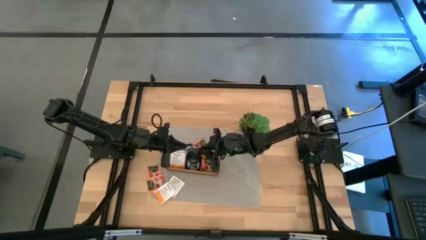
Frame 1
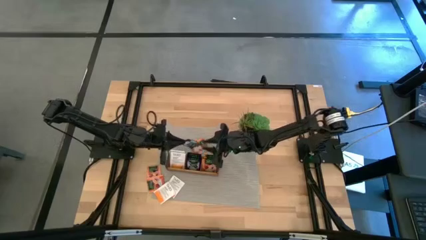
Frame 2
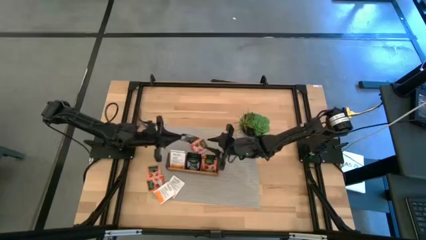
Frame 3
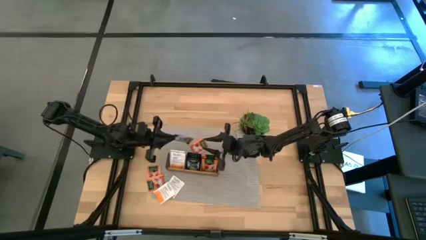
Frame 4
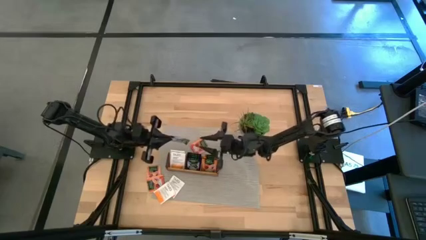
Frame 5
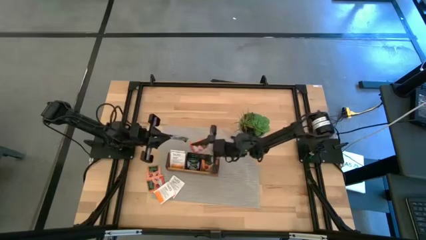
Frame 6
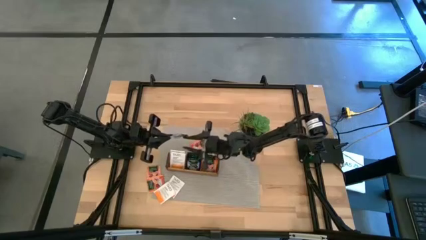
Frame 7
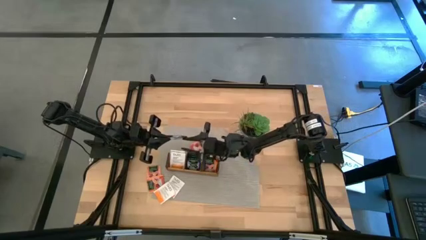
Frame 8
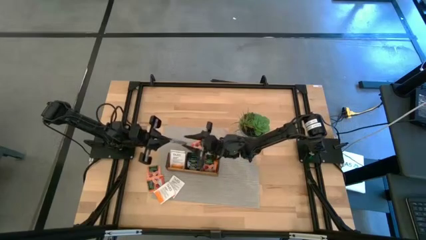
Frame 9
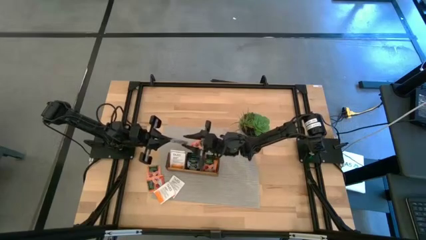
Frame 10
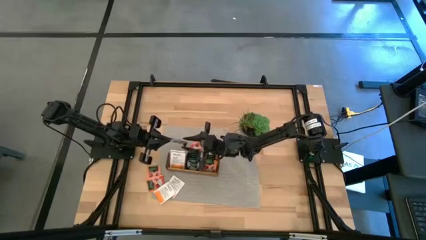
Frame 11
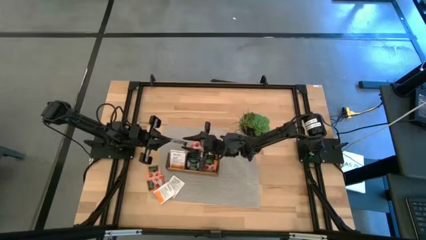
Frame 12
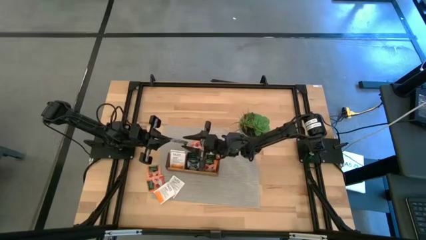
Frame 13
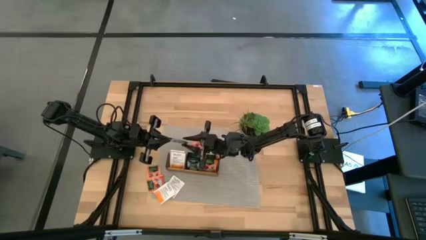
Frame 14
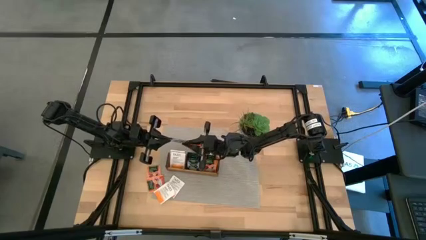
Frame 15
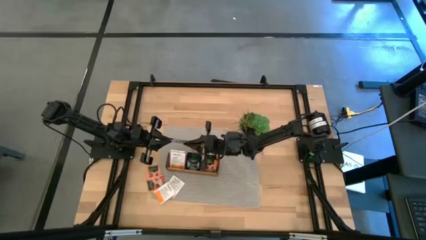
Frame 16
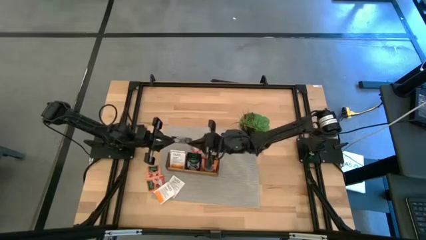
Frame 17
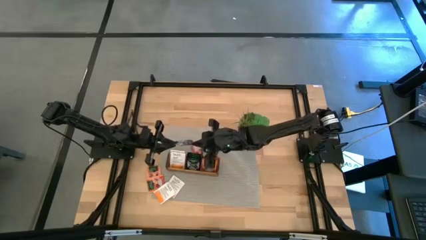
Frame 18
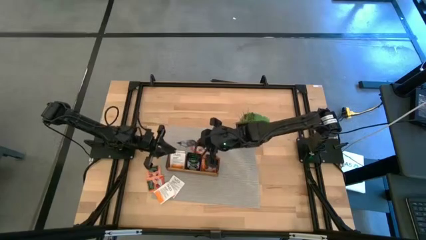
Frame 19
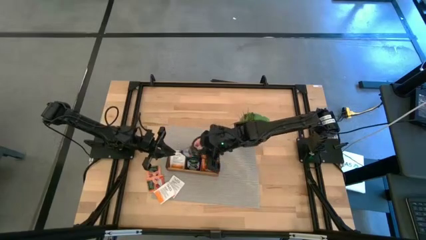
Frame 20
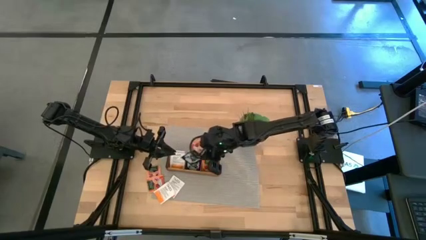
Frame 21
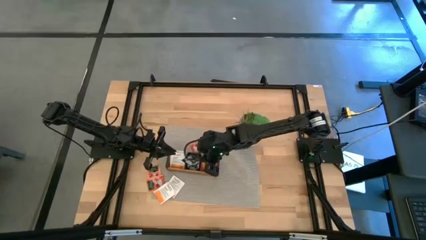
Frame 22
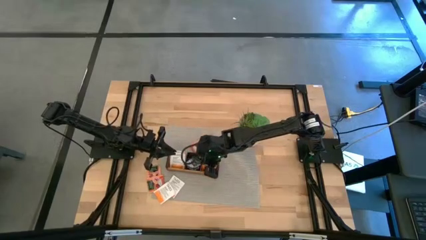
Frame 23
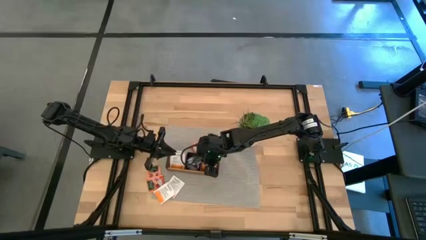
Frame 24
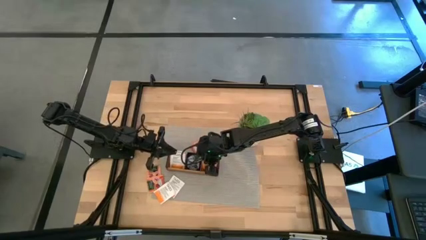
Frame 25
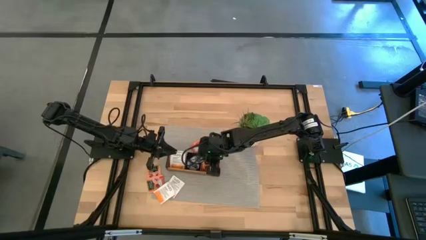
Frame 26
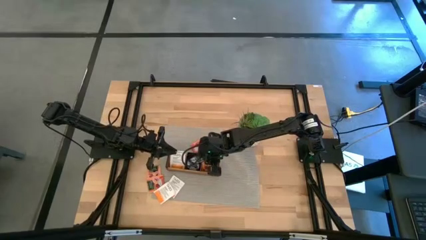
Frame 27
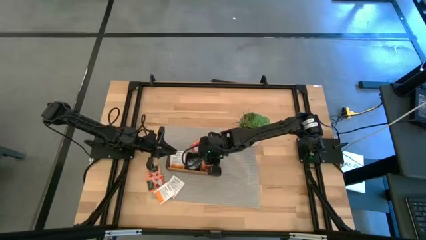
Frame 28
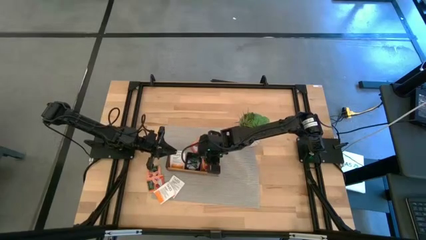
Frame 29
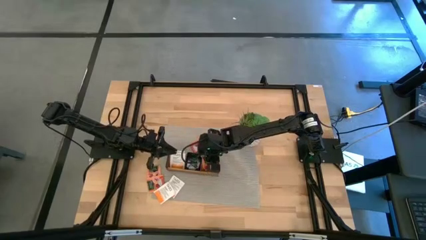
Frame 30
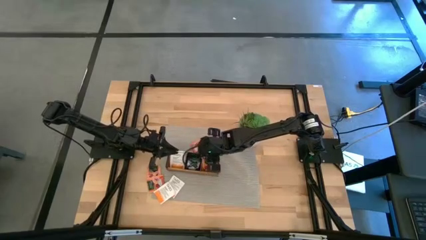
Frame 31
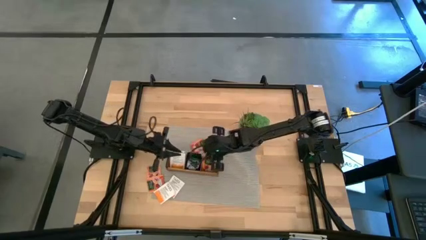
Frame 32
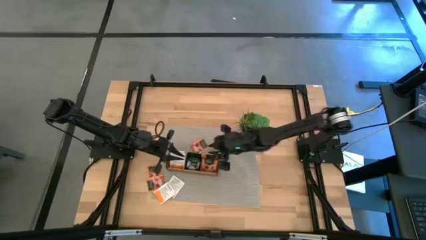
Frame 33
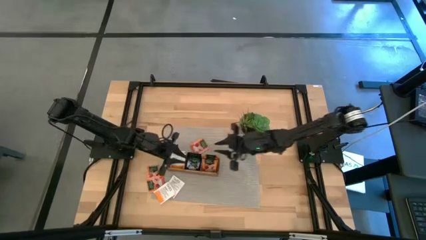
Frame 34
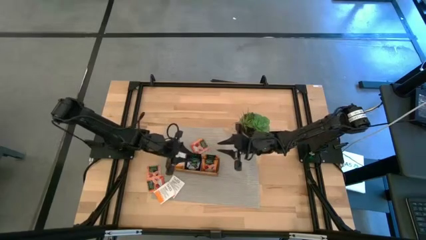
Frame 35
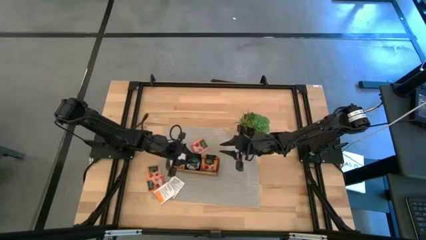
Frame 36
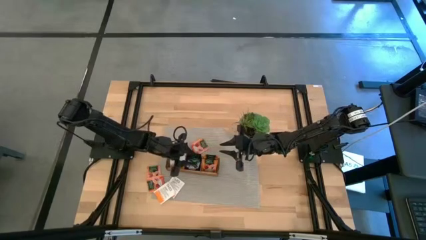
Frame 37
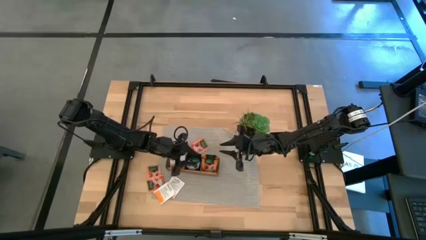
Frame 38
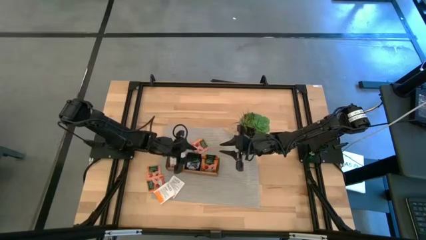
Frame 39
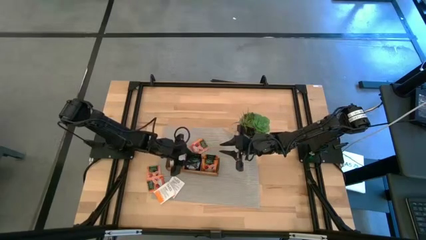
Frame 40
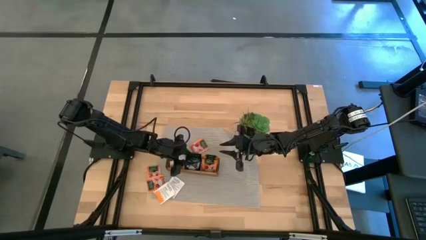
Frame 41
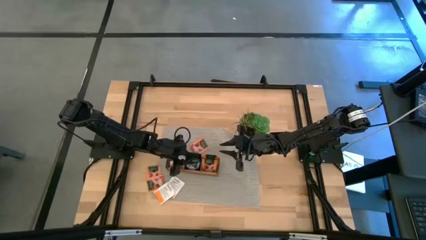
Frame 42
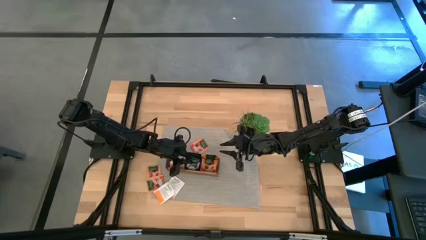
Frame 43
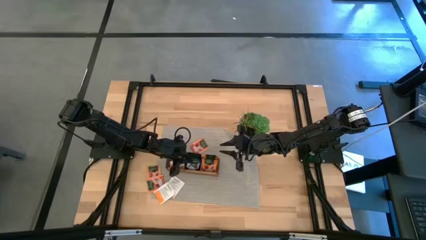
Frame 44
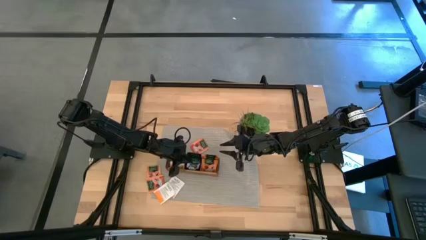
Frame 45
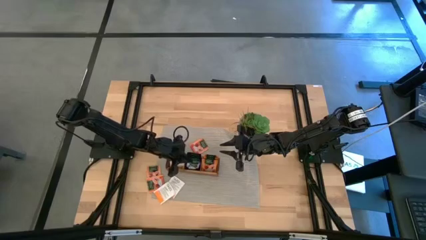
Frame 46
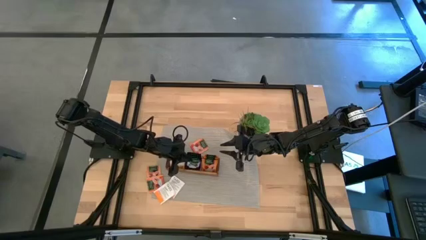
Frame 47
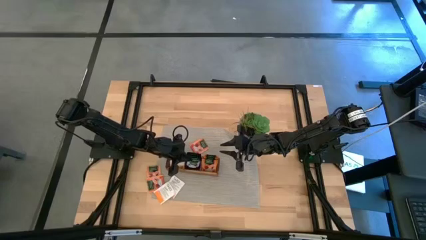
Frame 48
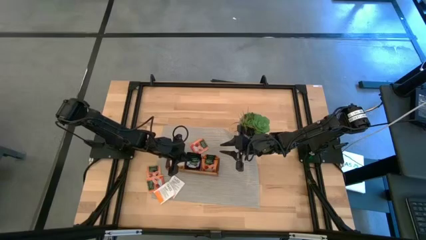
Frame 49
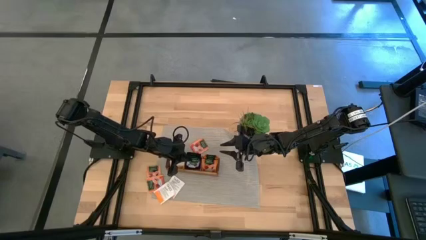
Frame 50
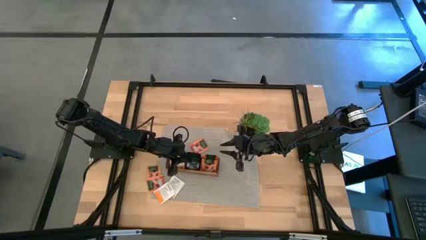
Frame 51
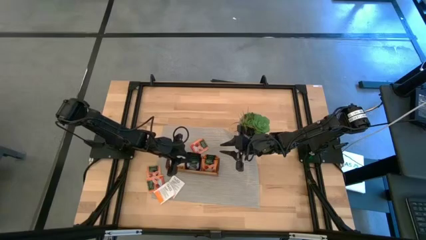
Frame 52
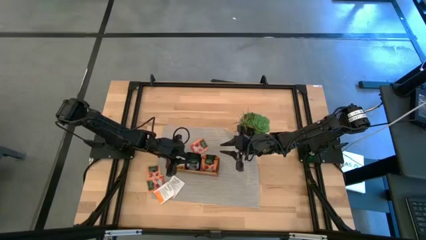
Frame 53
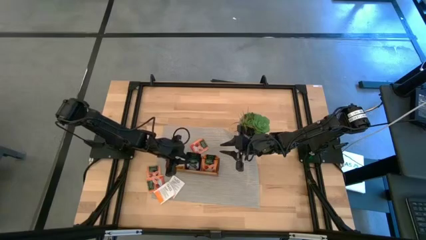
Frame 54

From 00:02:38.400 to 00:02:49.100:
Task: Pick & Place Tea
Put the violet tea bag into the middle section of the wooden organizer

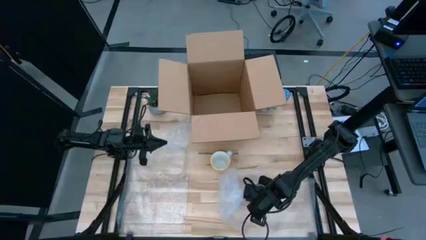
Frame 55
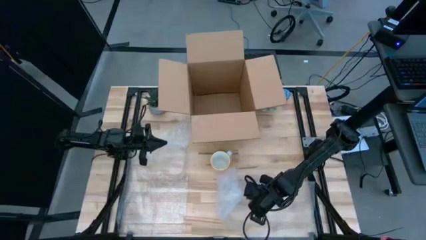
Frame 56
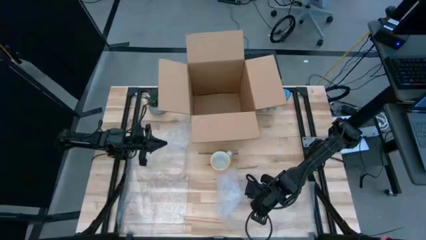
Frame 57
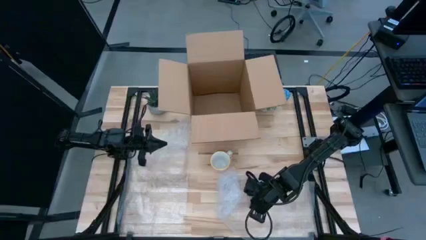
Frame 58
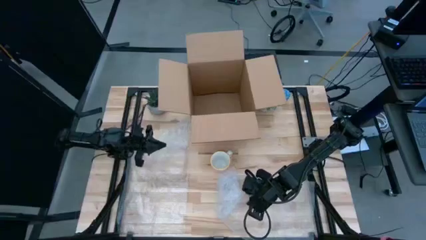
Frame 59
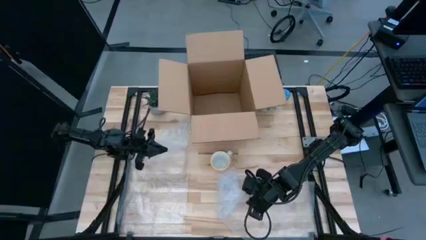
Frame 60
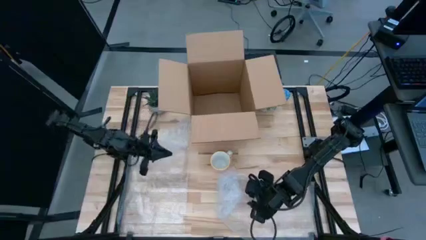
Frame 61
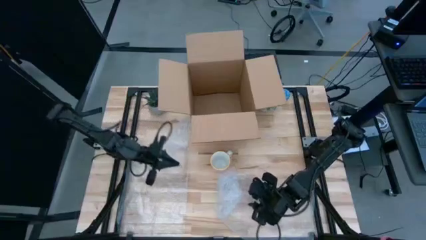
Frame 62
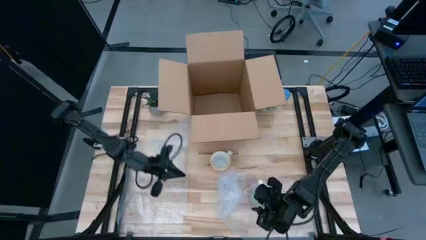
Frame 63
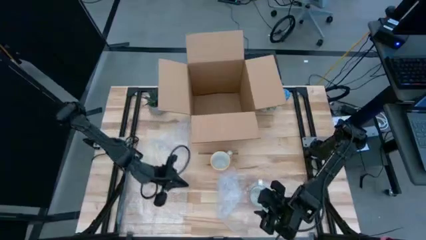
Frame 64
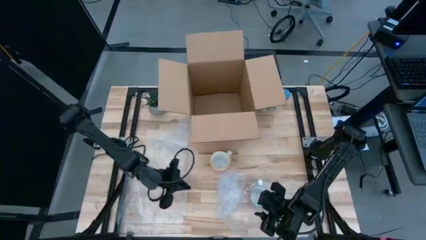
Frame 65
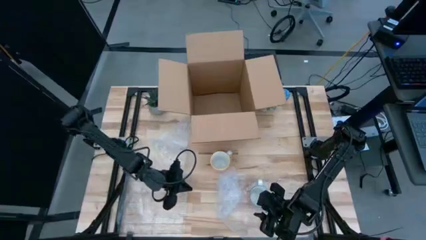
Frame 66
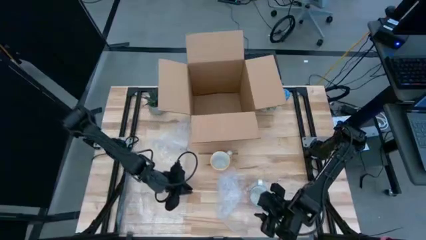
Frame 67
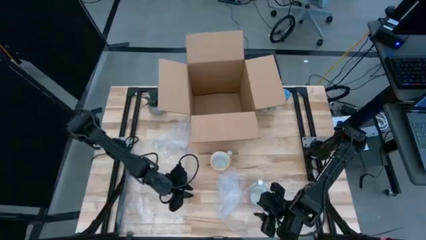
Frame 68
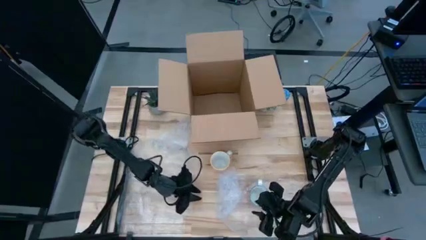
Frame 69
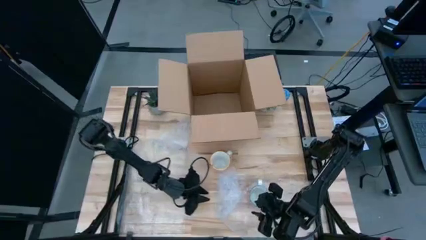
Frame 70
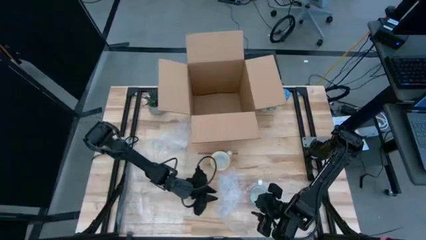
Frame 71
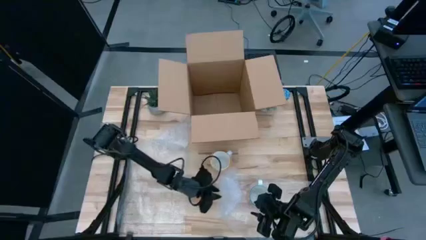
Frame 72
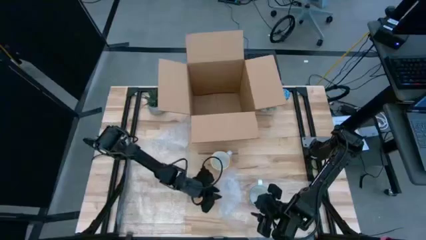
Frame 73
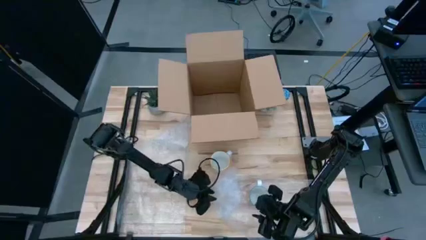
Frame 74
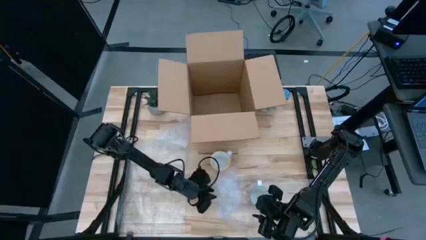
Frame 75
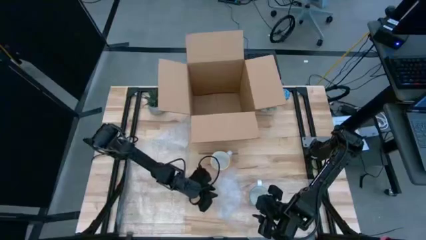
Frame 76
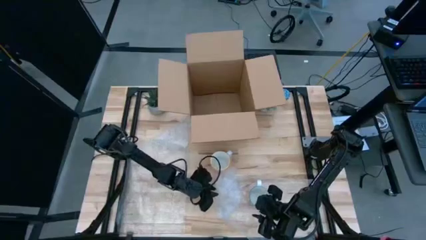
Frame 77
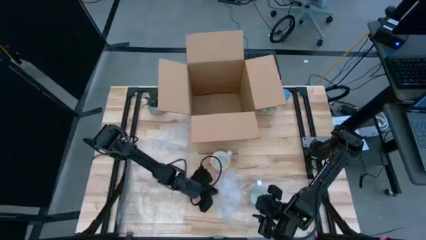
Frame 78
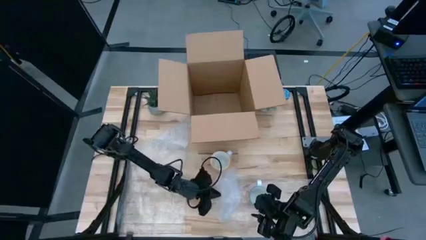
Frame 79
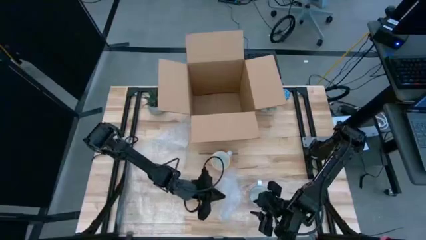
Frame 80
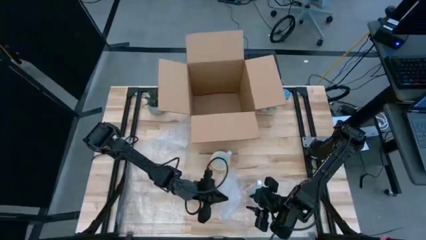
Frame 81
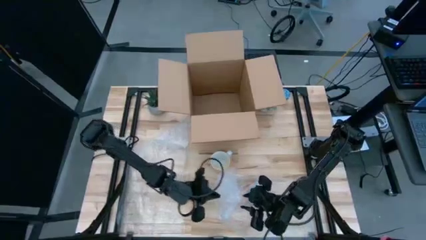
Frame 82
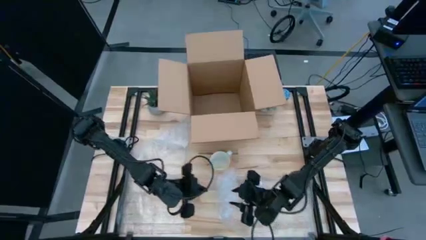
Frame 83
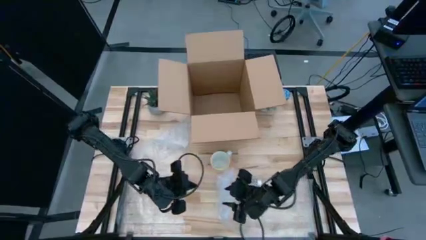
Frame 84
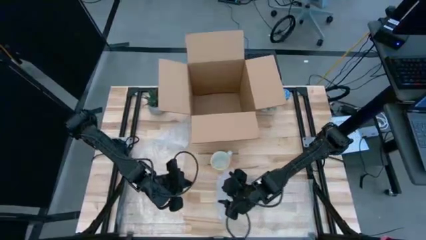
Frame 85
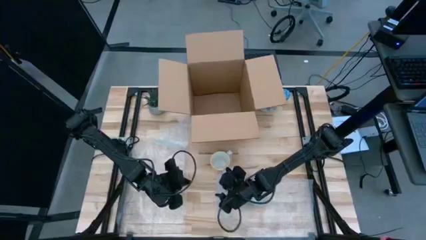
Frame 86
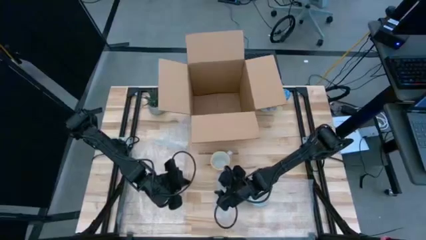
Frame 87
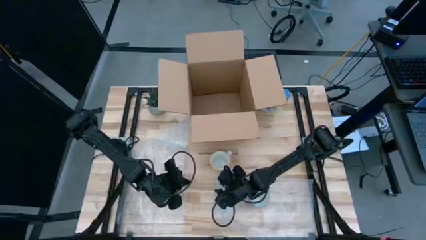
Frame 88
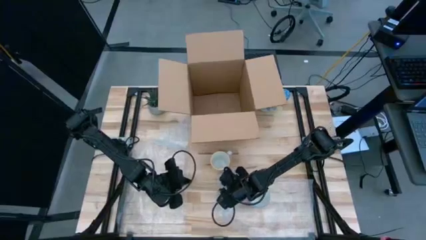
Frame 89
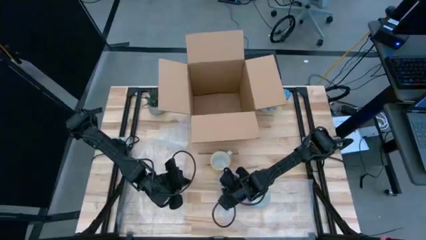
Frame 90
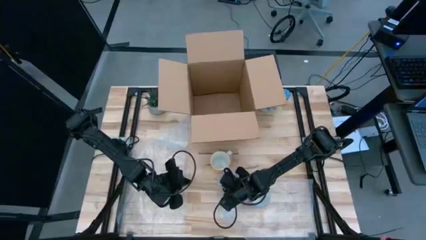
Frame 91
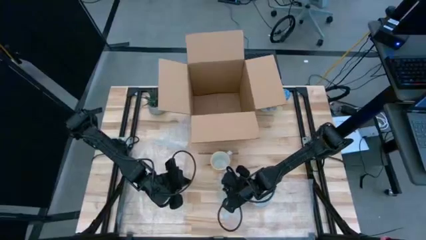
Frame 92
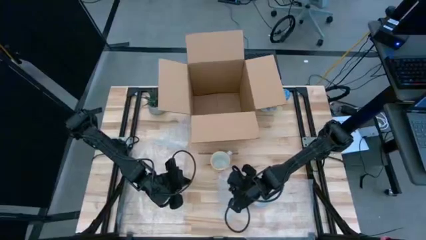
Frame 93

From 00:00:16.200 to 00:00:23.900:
Task: wrap mug
Wrap the red mug with bubble wrap
